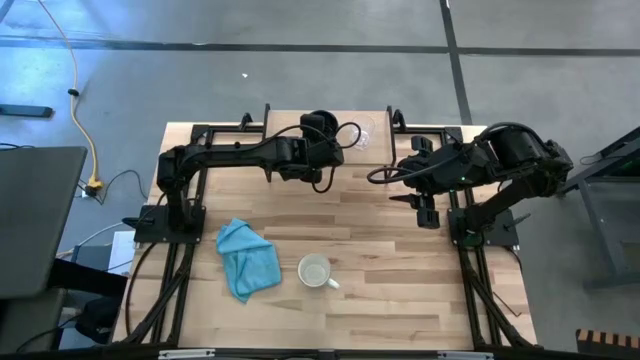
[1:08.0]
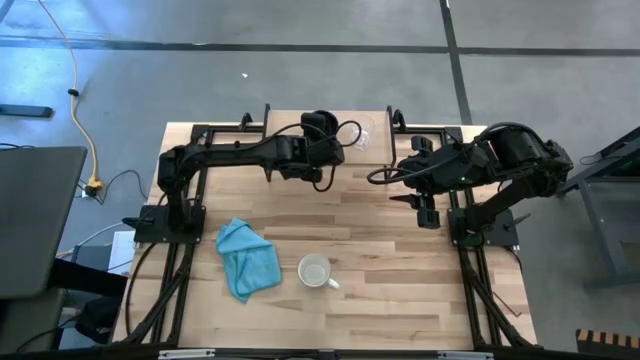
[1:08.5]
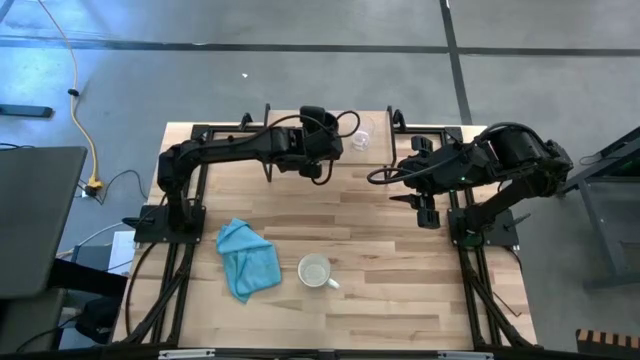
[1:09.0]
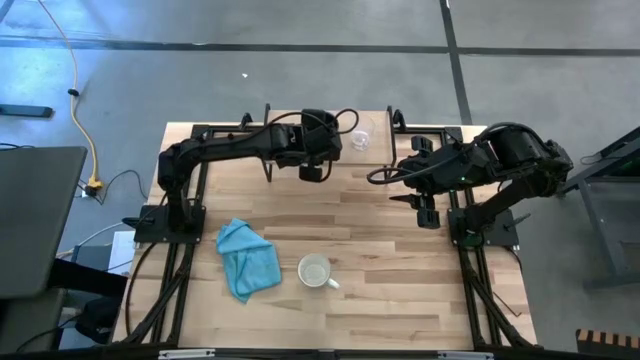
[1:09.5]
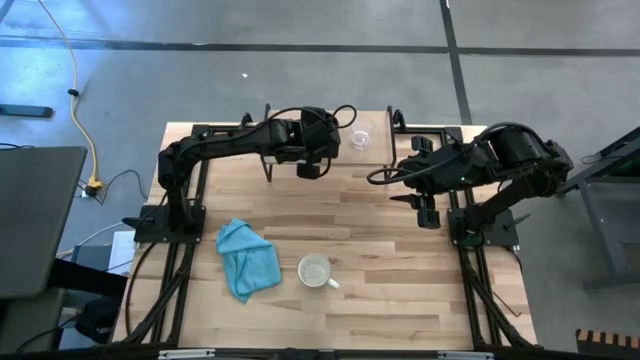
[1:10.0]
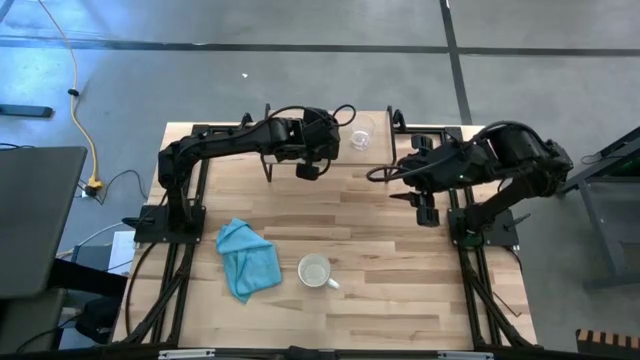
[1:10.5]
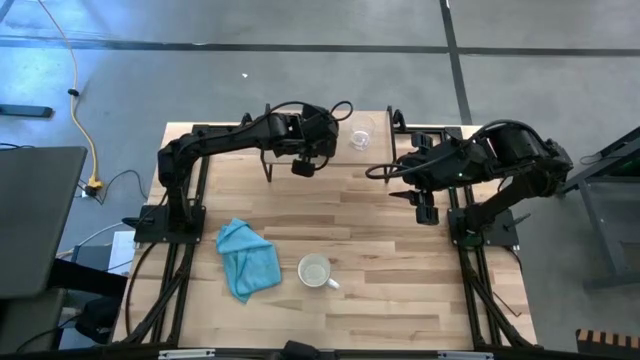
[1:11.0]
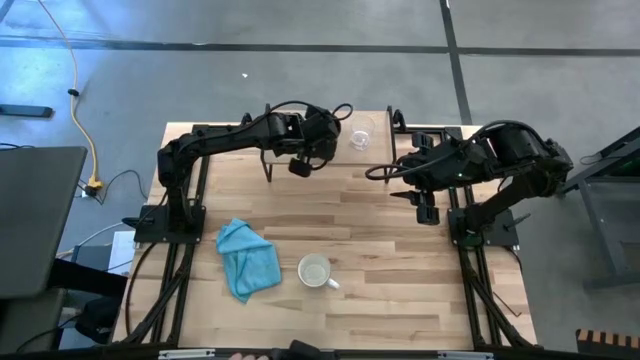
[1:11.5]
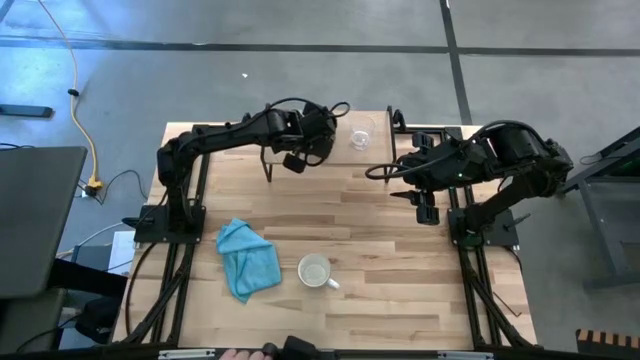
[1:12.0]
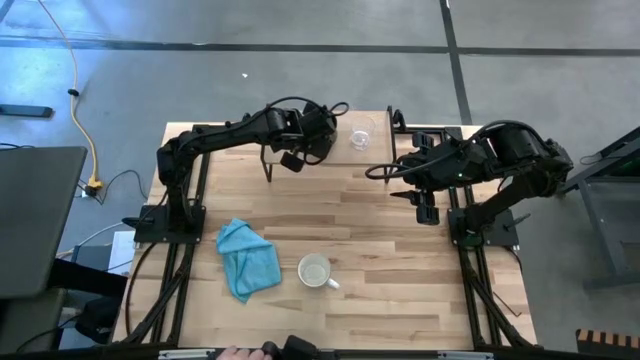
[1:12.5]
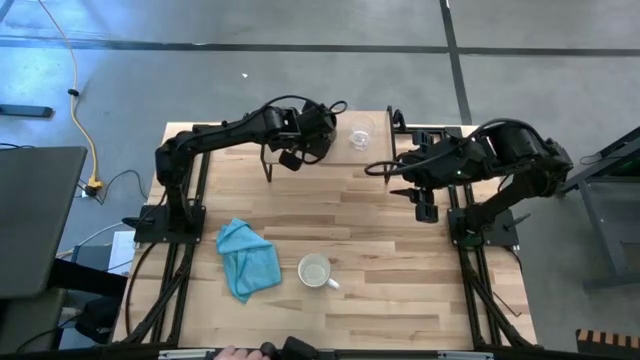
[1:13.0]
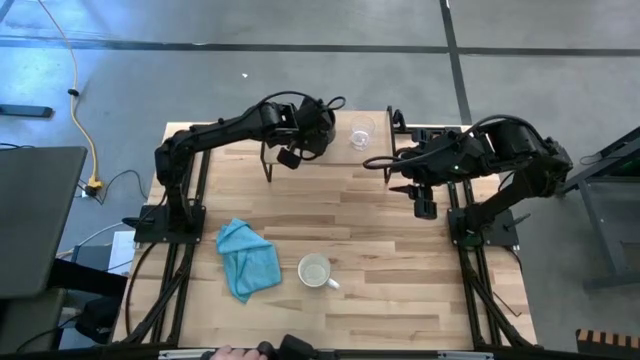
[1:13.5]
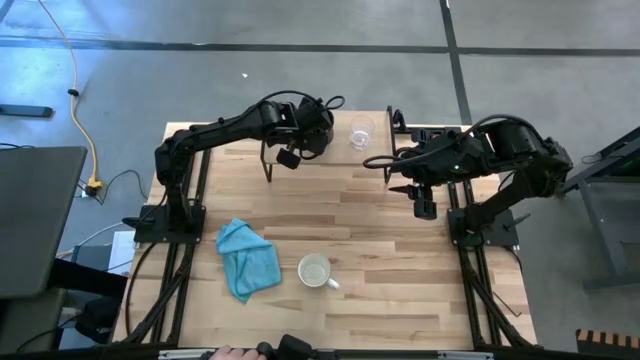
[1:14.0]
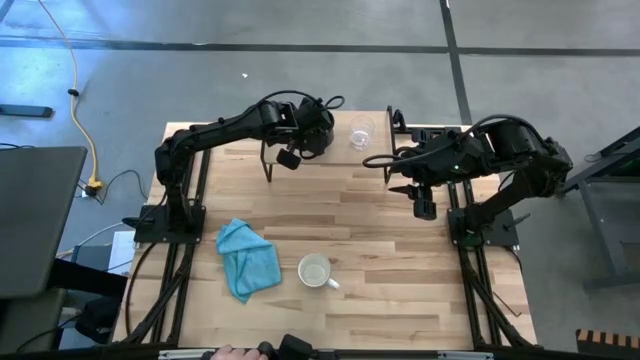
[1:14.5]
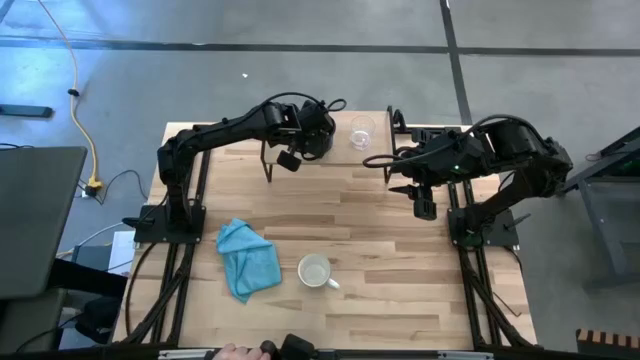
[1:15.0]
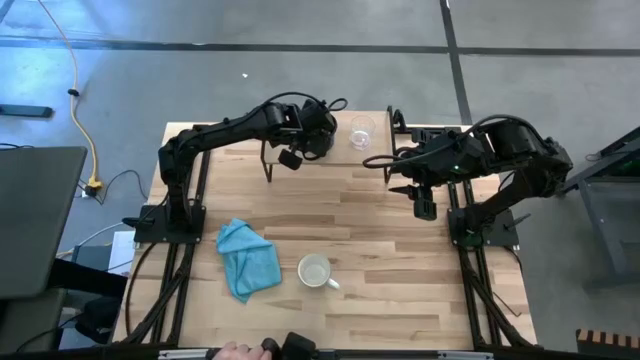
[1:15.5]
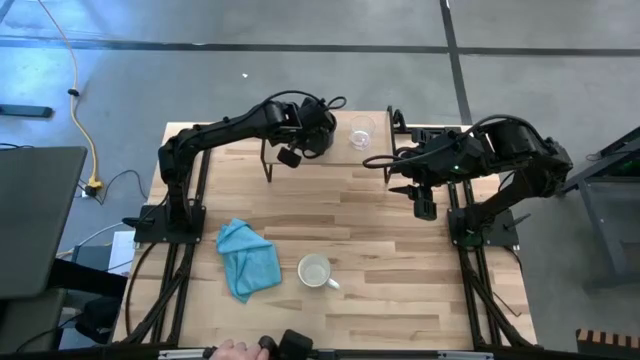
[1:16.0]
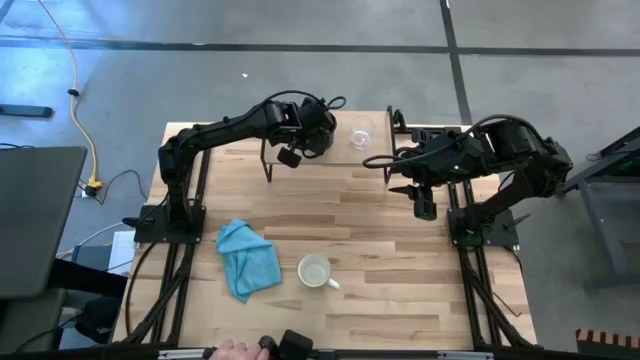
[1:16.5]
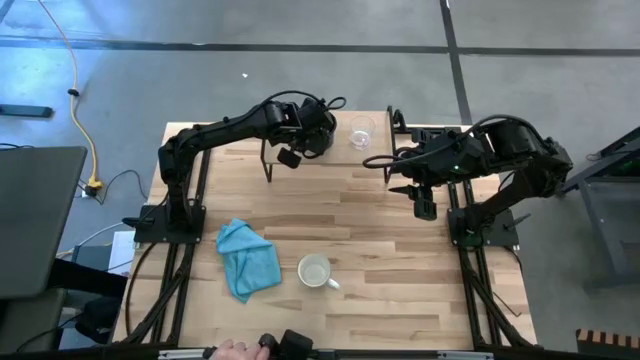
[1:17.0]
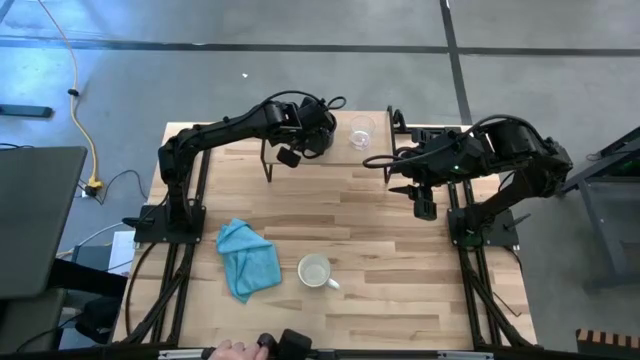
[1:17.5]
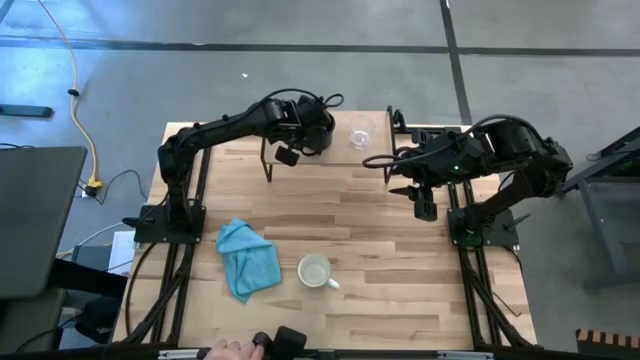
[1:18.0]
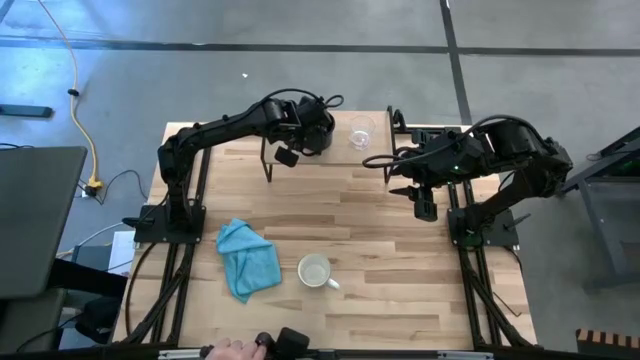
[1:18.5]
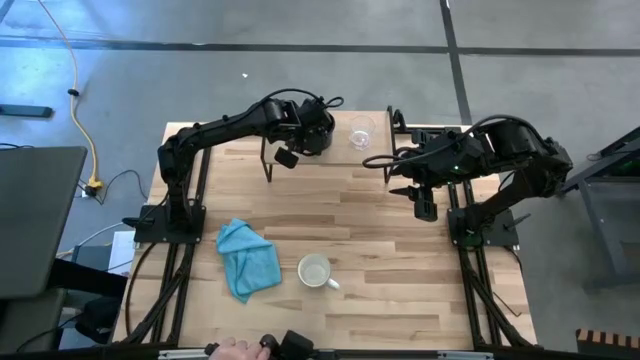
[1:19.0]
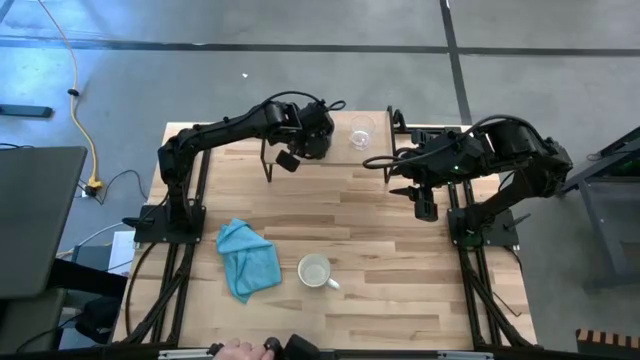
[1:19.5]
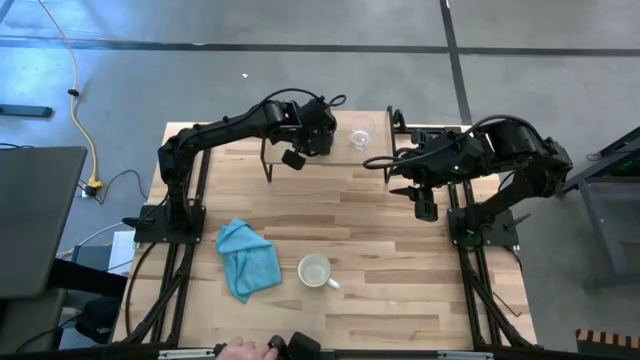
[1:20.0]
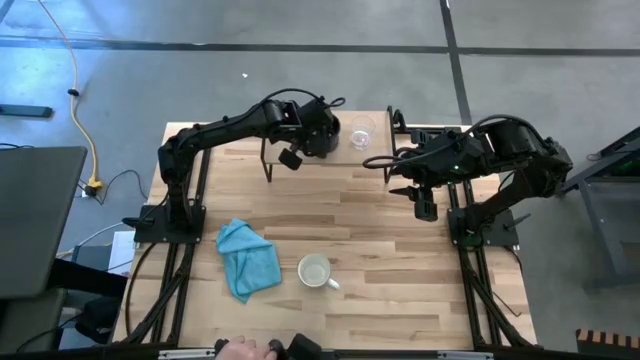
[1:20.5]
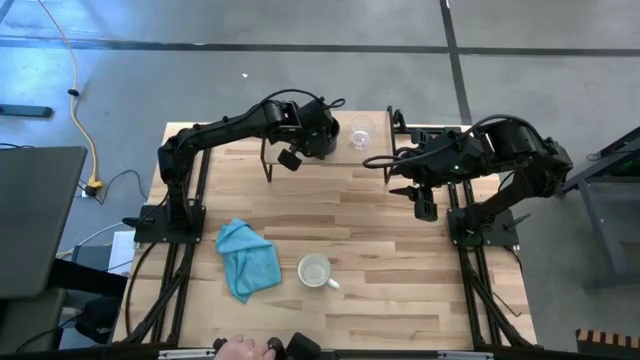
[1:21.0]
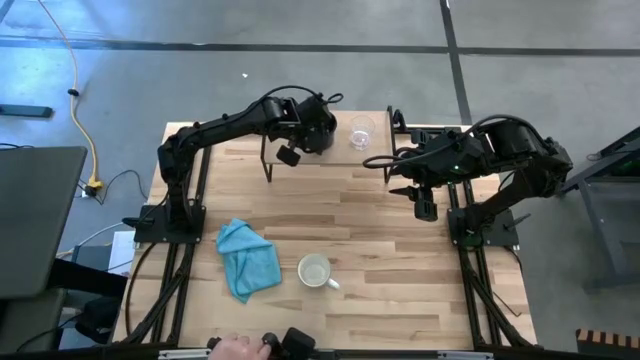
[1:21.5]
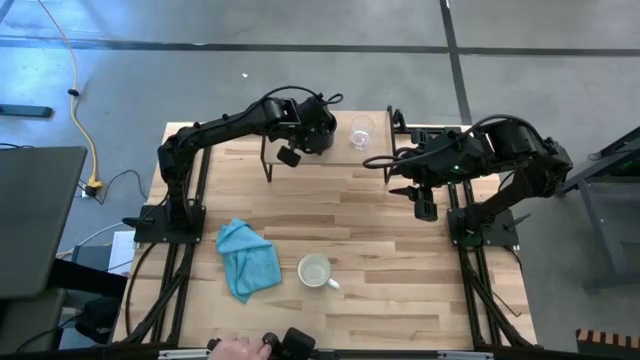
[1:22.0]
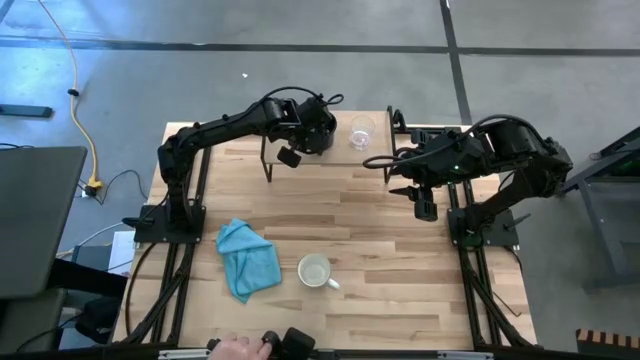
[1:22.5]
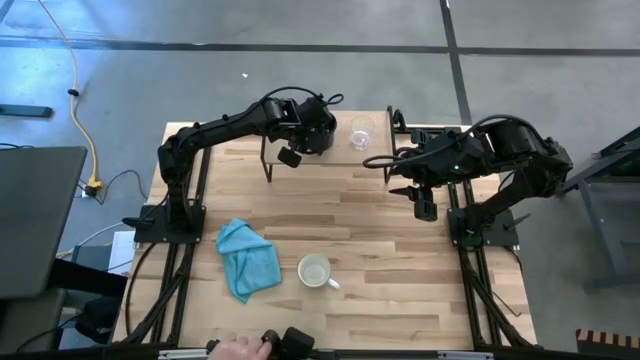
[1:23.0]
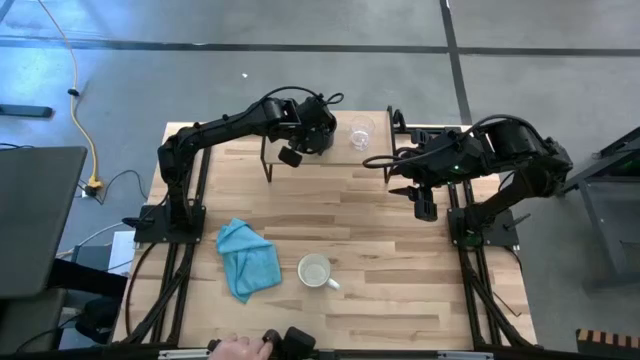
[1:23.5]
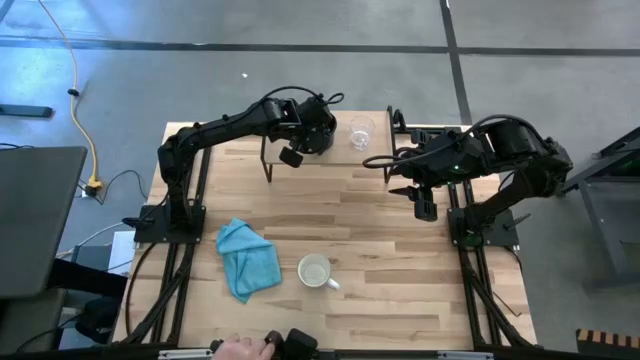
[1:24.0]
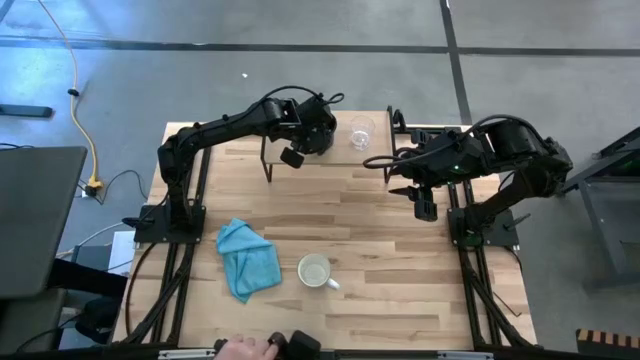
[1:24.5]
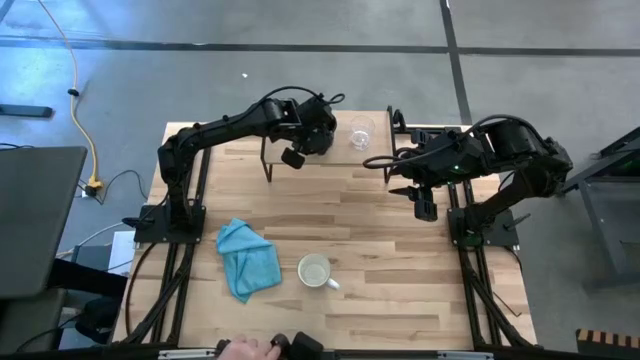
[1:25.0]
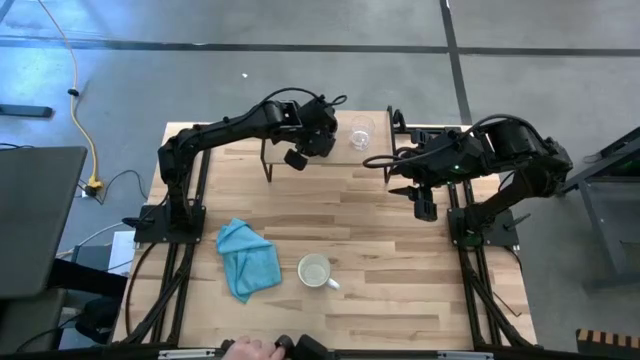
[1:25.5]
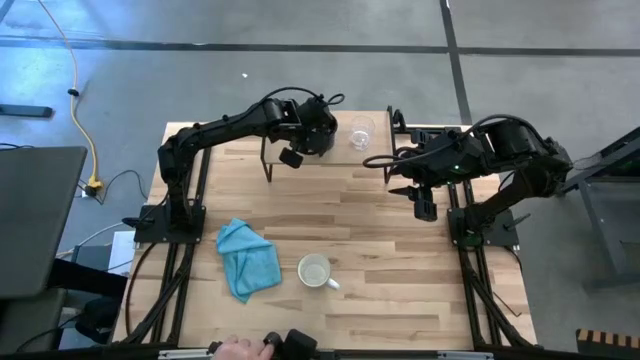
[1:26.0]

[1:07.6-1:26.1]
Task: Stack small to large cups/mugs on shelf
Put the dark blue mug on the shelf

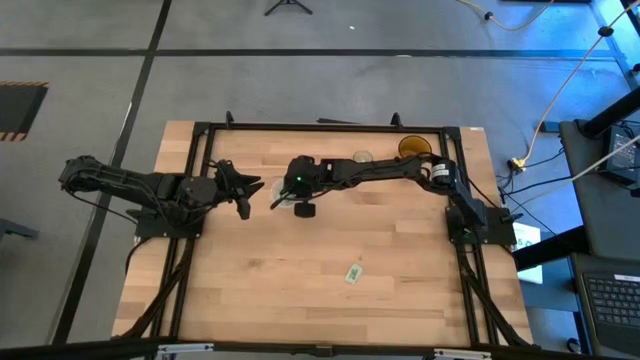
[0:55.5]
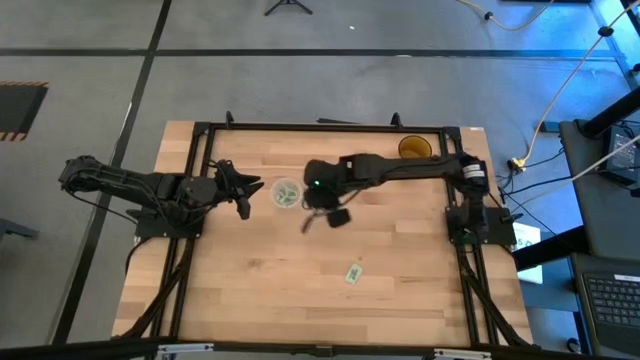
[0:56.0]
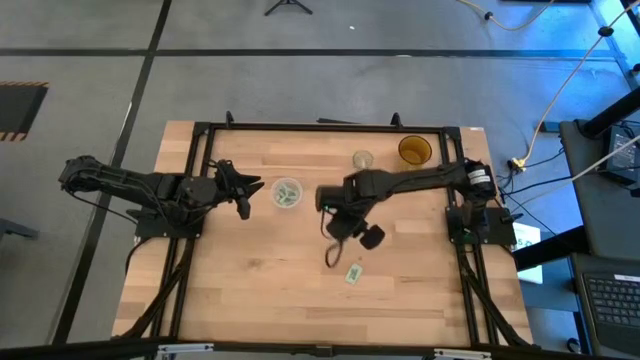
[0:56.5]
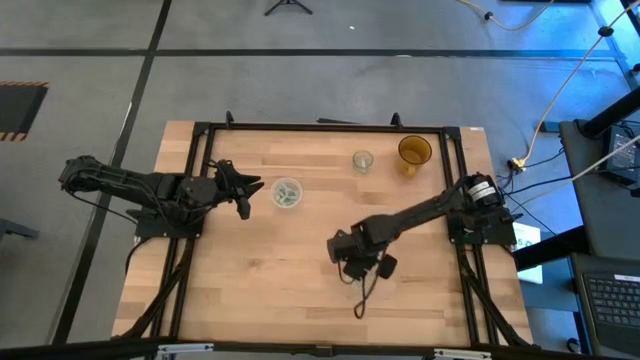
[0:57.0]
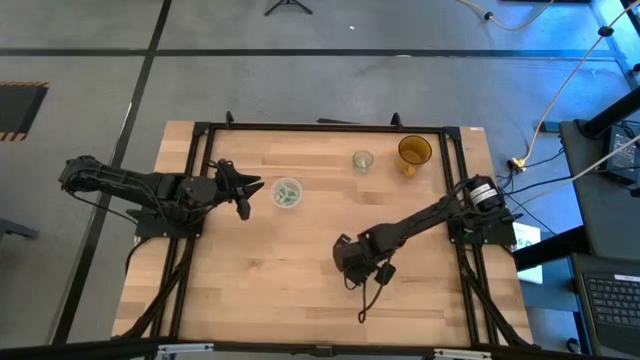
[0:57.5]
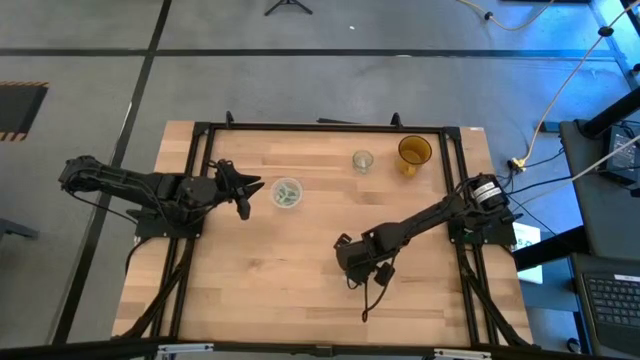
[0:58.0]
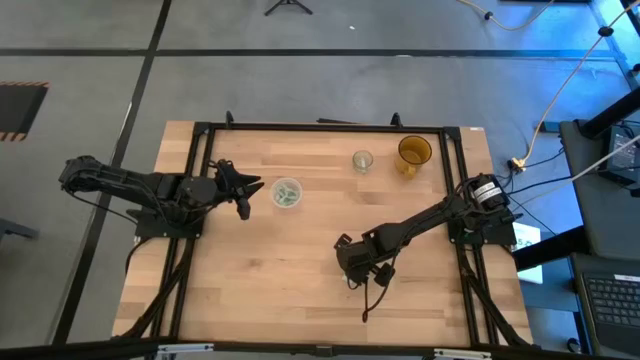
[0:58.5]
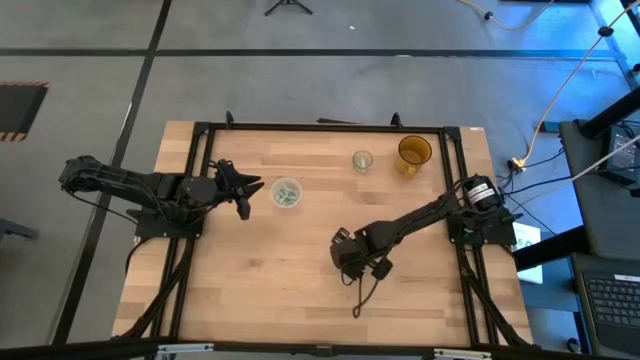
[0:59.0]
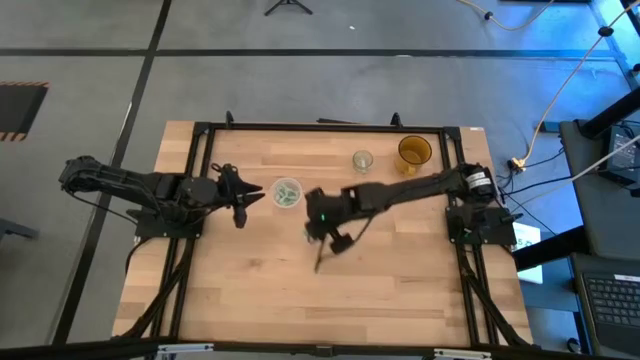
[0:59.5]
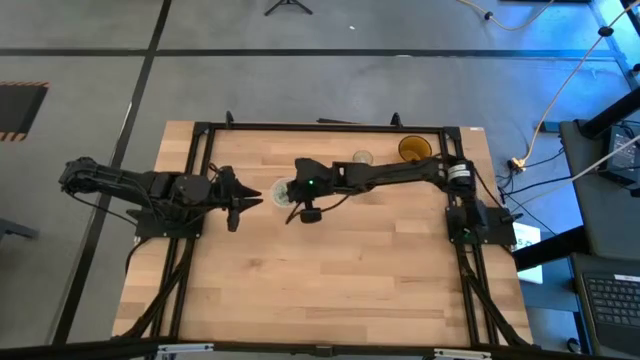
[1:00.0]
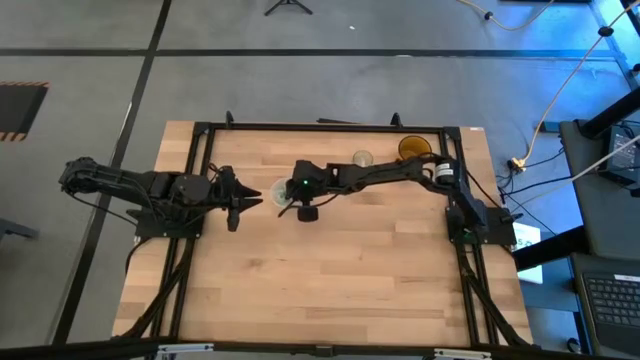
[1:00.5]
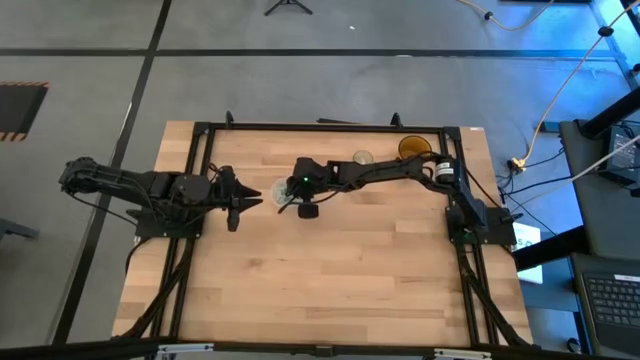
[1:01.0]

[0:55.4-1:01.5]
Task: Pick and place Stevia / Truvia into bins
Put the stevia packet into the transparent container
